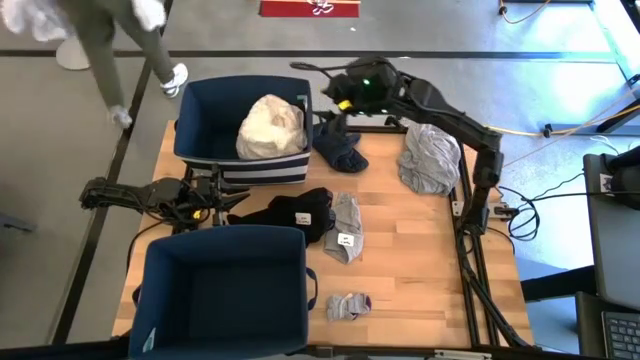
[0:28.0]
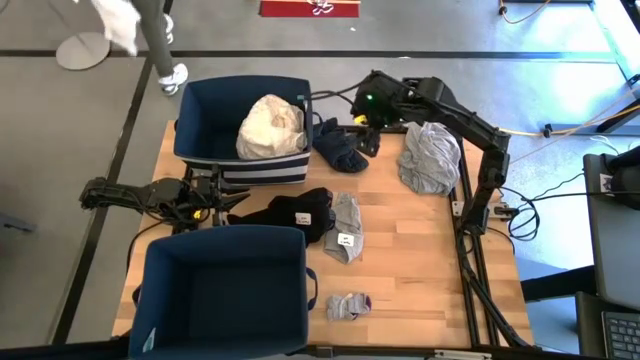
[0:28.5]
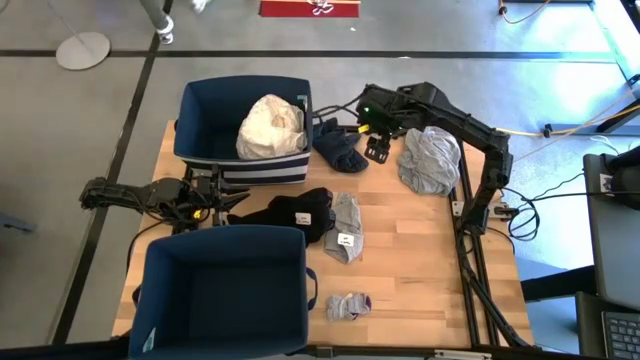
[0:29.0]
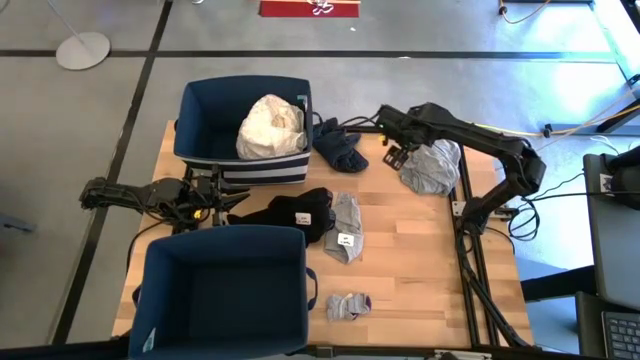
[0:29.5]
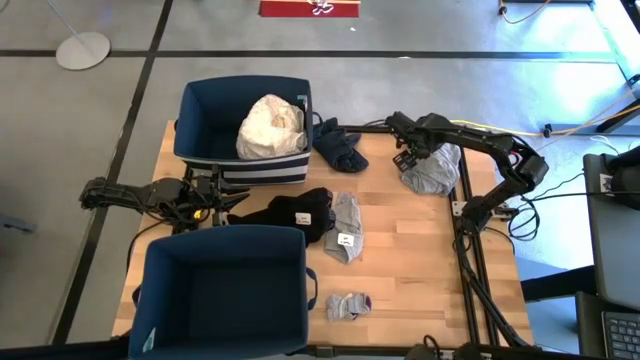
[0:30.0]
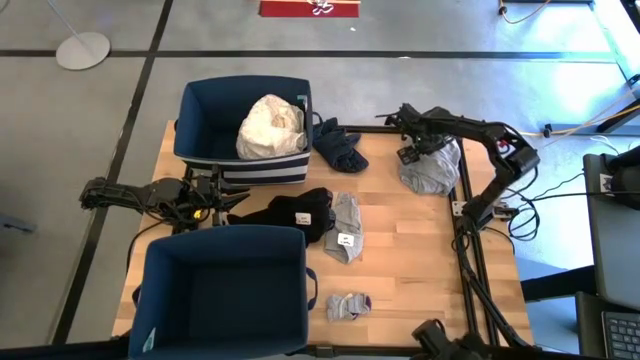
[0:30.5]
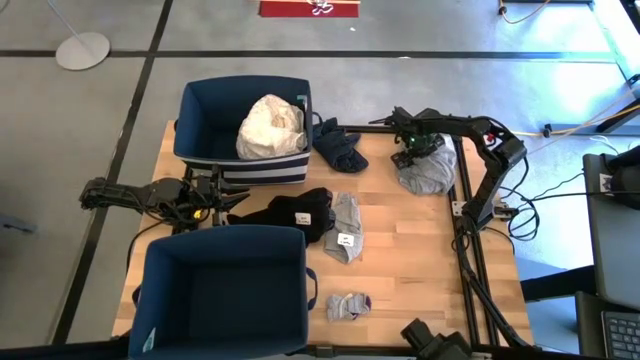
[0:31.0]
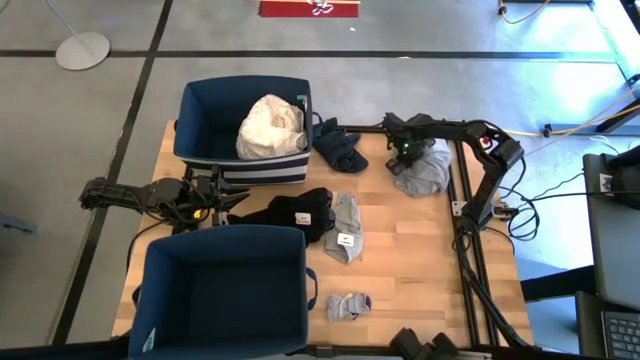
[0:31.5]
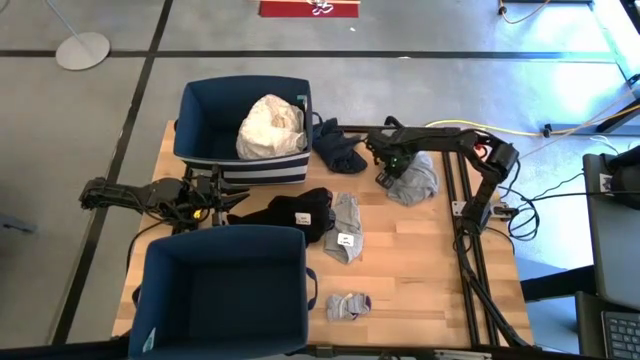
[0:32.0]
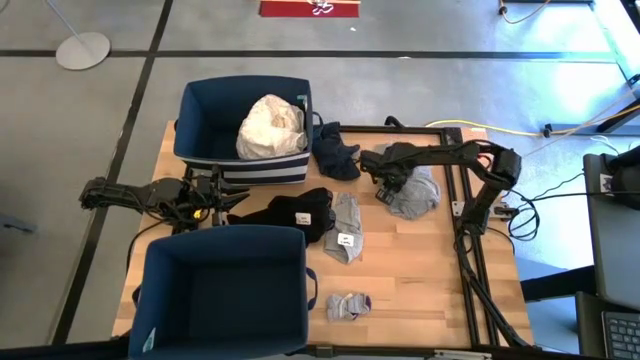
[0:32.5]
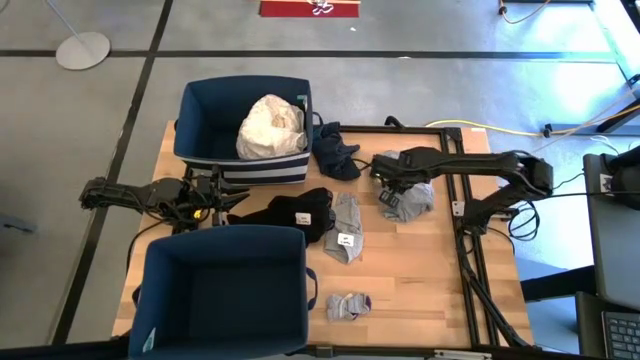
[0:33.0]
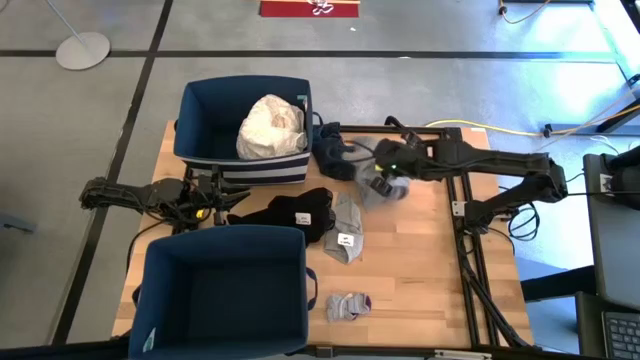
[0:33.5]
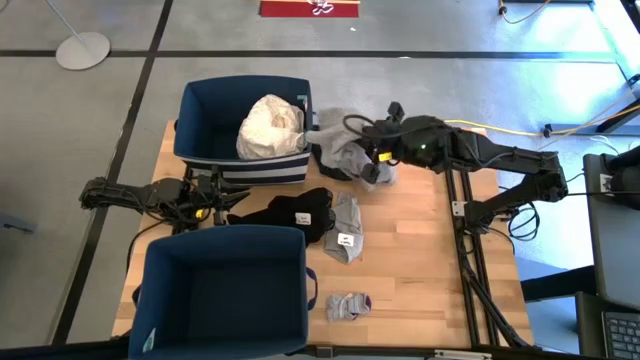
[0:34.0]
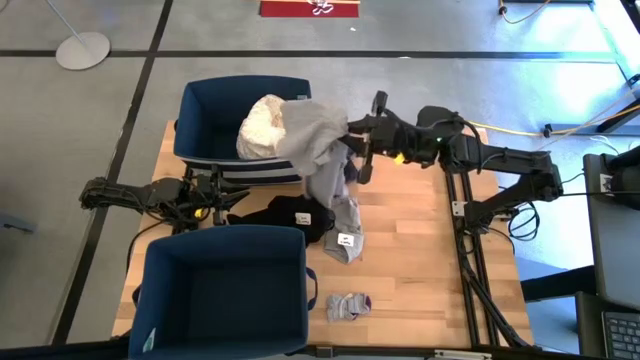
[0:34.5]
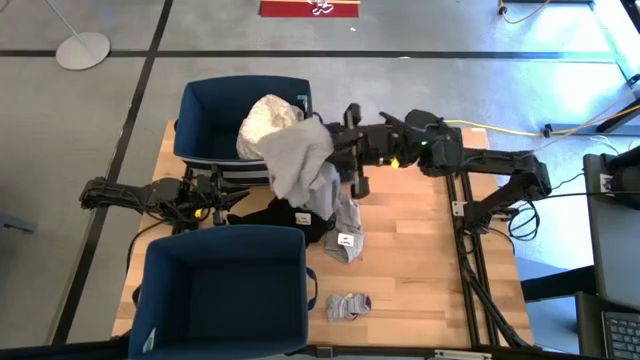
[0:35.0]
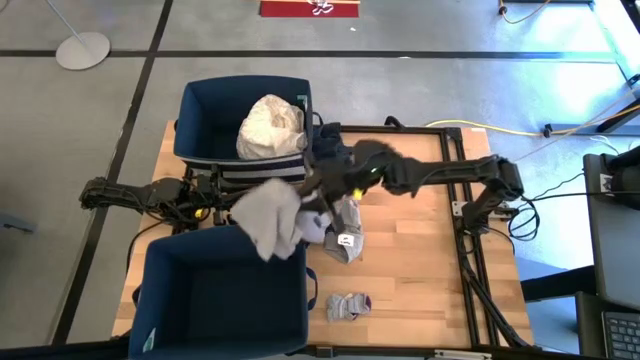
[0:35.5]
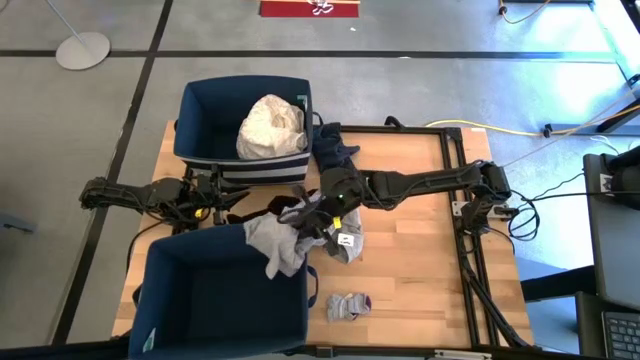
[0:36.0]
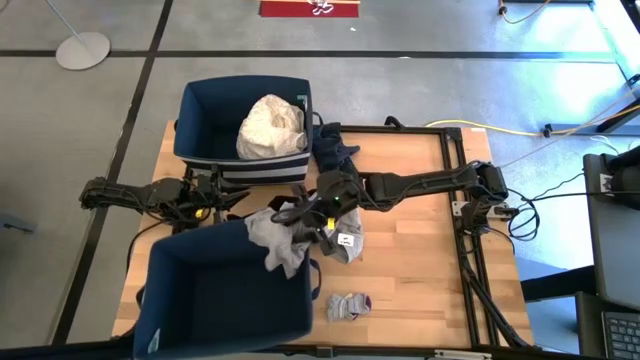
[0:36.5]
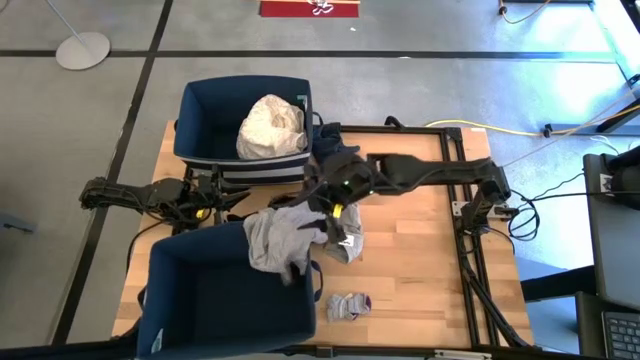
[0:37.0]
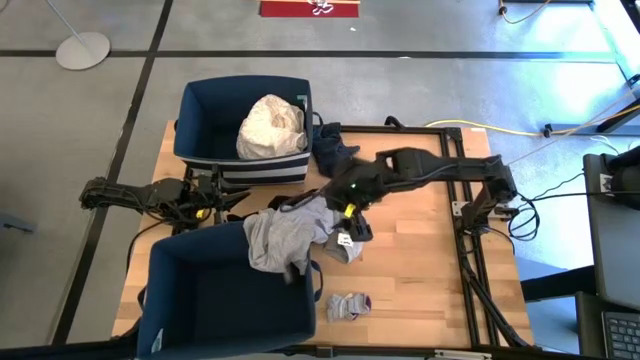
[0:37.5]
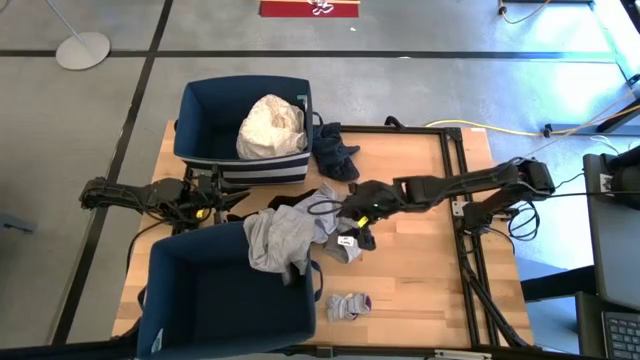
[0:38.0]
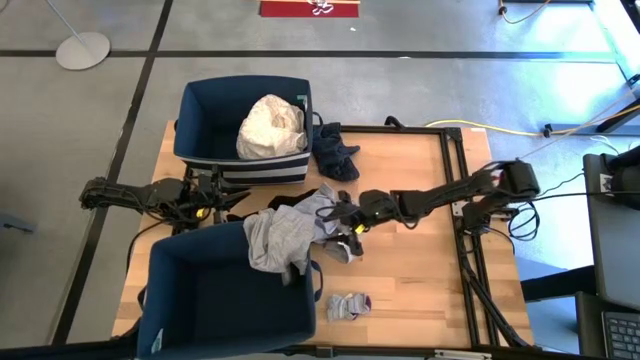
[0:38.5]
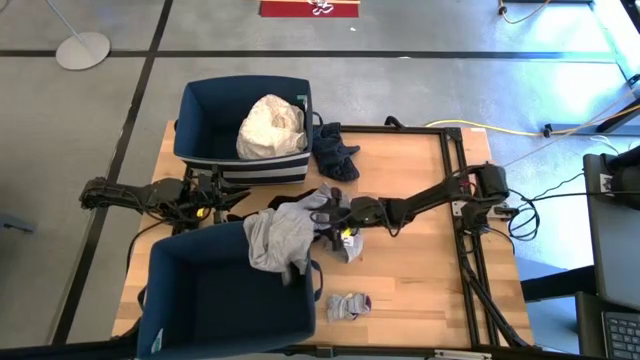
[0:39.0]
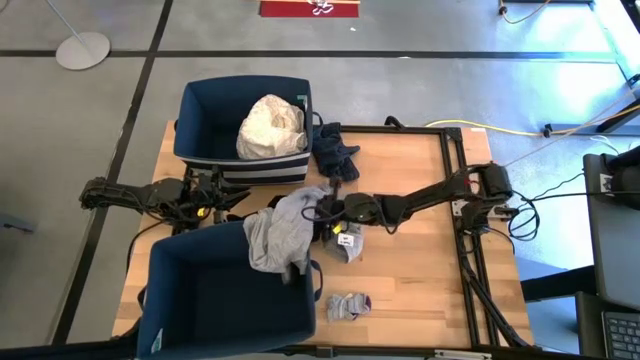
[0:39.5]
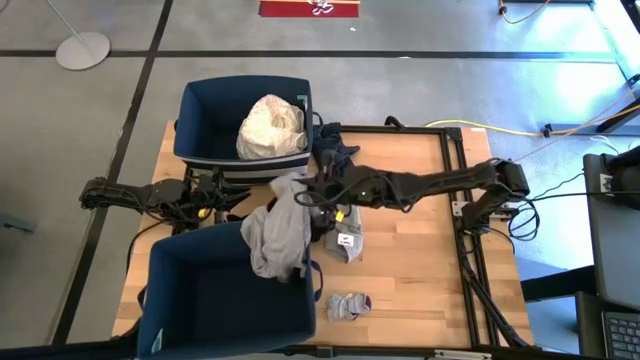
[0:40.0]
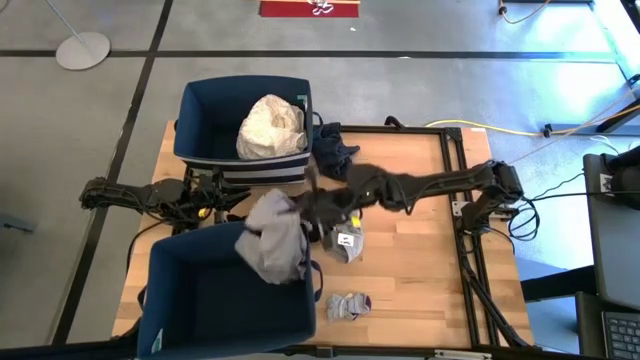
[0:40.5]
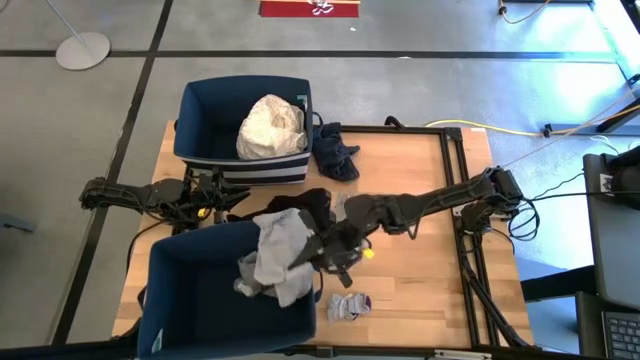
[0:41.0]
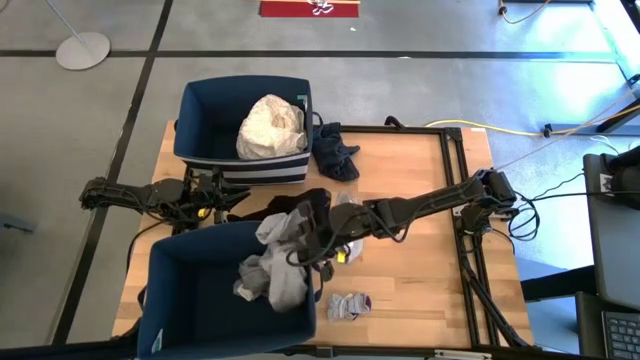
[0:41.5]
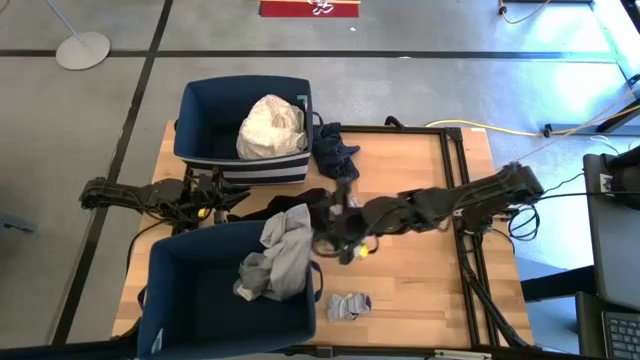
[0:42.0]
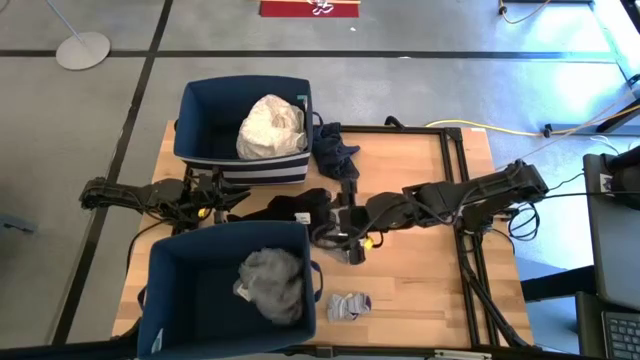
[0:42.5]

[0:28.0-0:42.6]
Task: Sort clothes
Put the gray pants into the bottom blue laundry organizer

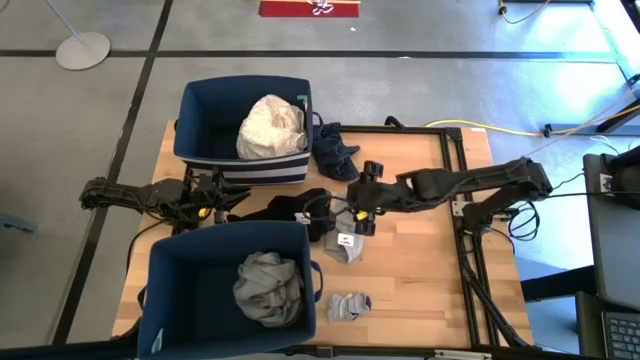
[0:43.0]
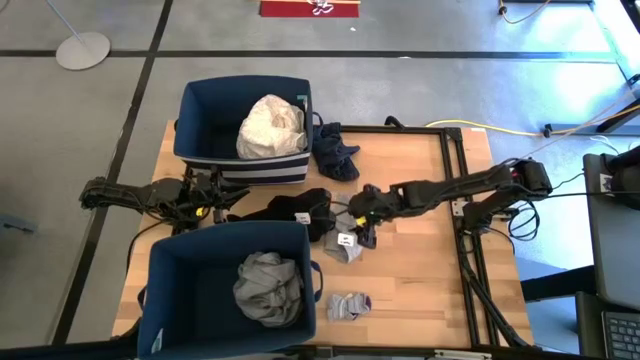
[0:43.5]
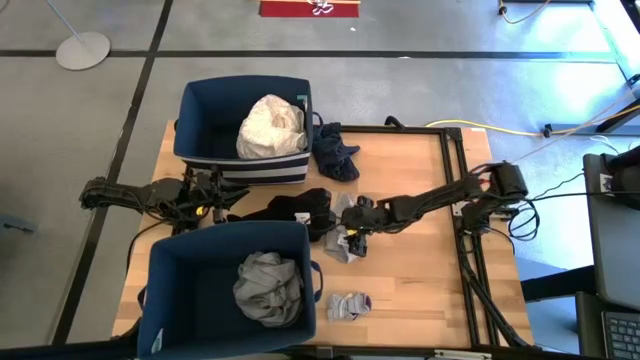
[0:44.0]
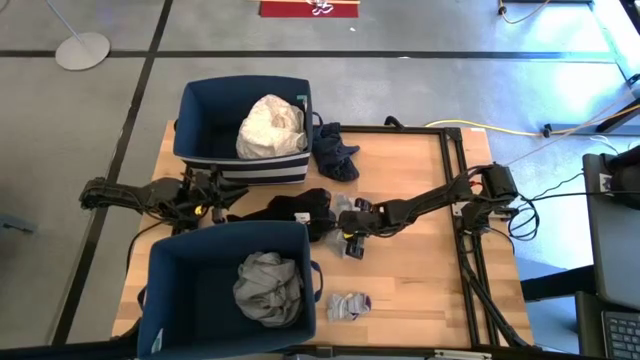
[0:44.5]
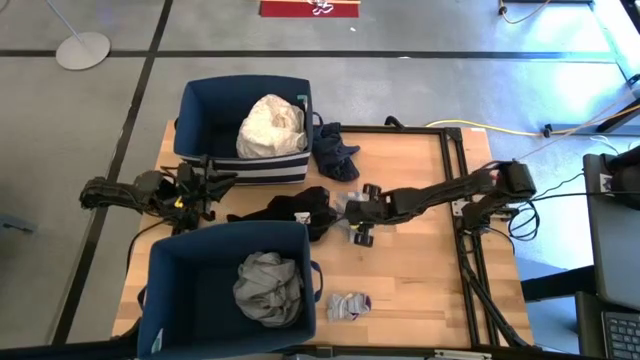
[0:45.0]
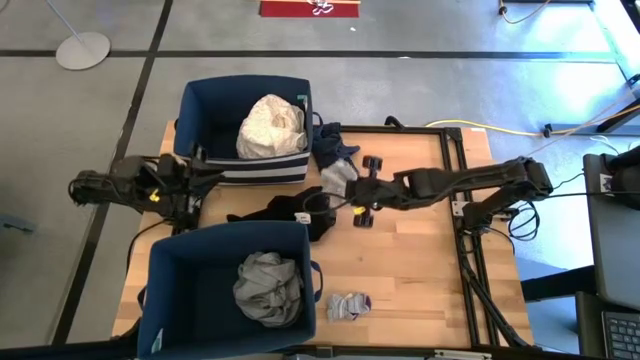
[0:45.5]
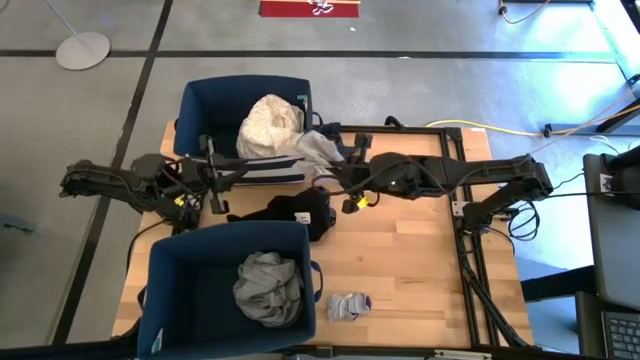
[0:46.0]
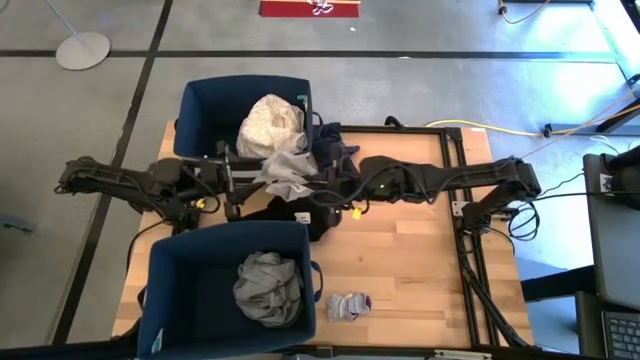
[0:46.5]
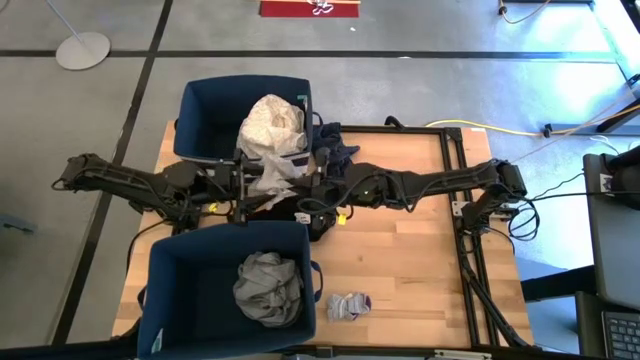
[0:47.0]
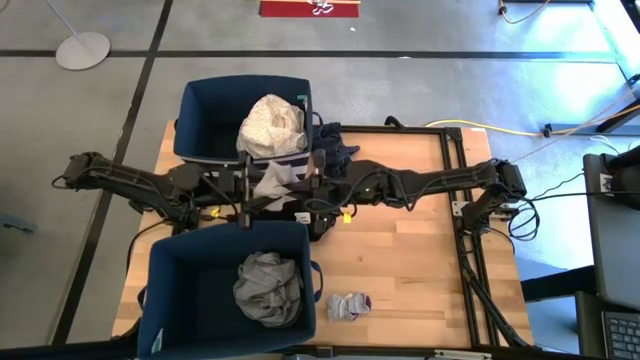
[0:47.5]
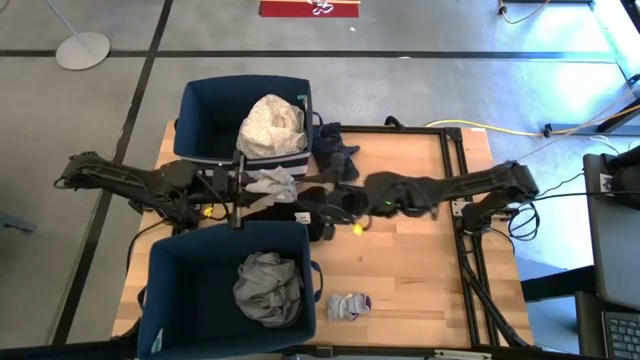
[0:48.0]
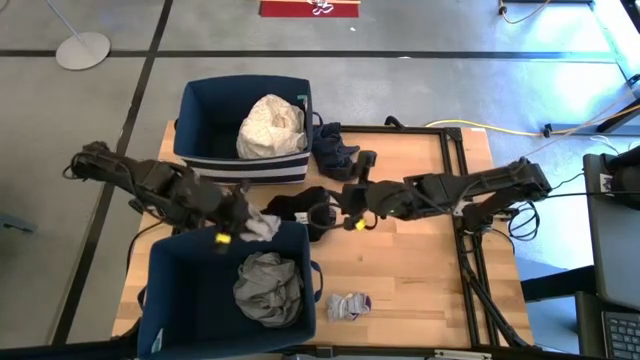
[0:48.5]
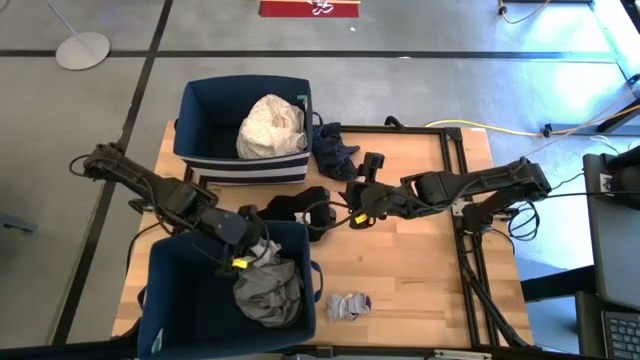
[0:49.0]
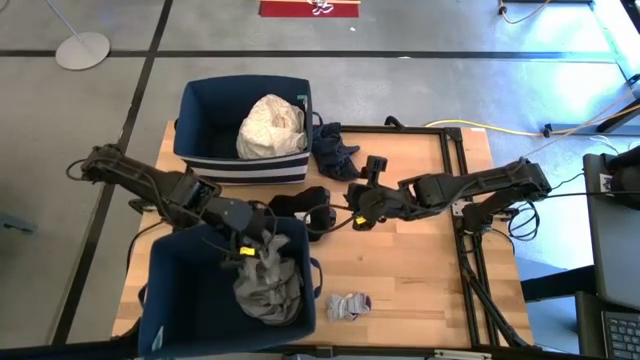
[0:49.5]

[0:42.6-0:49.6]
Put the gray shorts into the bottom blue laundry organizer
